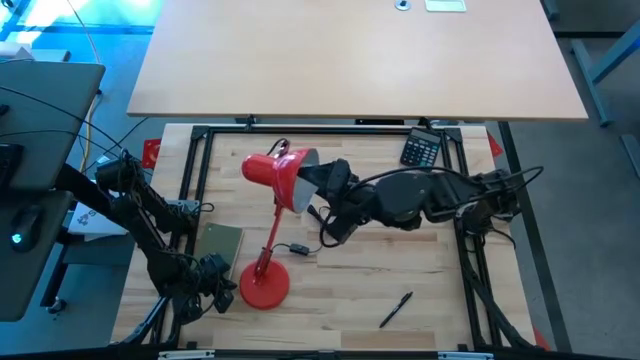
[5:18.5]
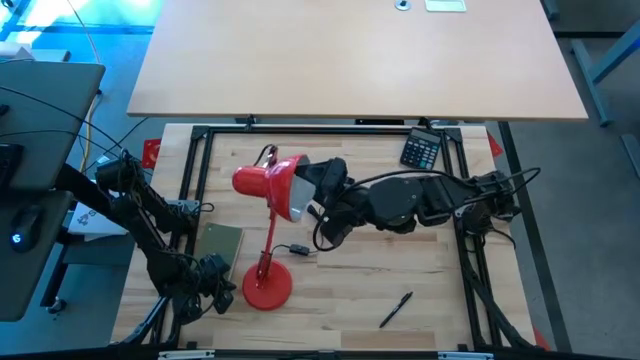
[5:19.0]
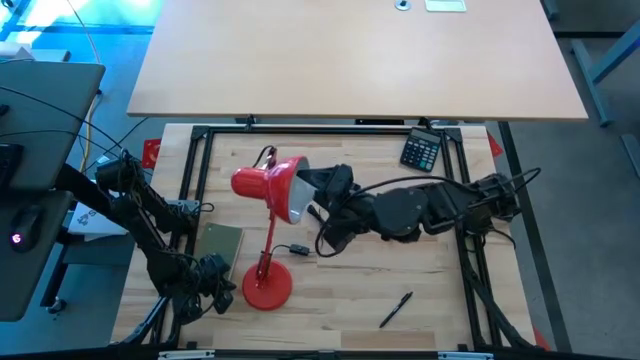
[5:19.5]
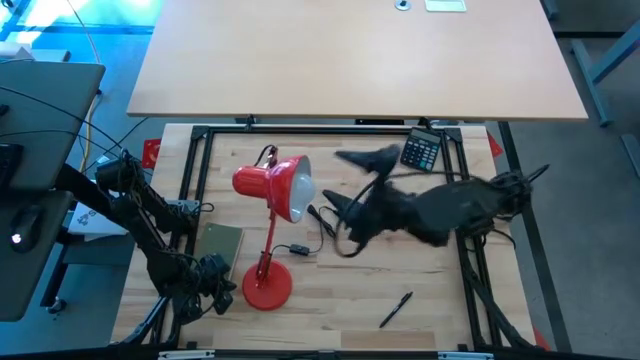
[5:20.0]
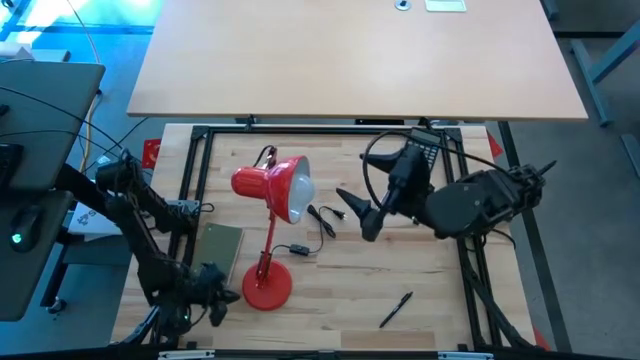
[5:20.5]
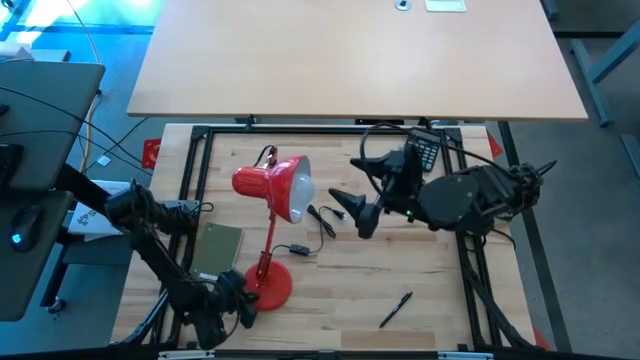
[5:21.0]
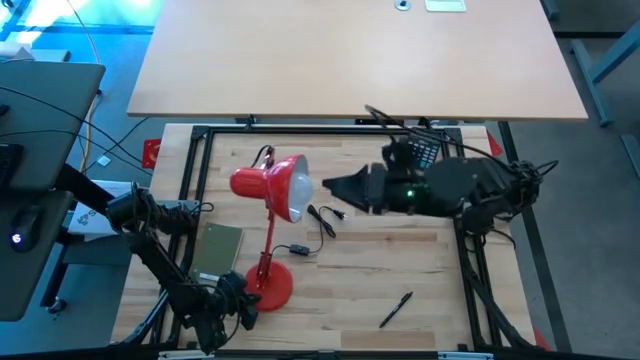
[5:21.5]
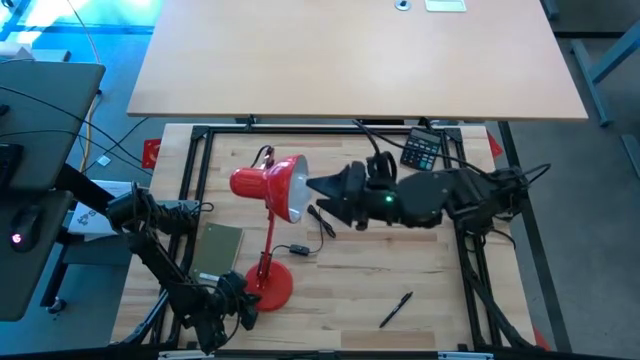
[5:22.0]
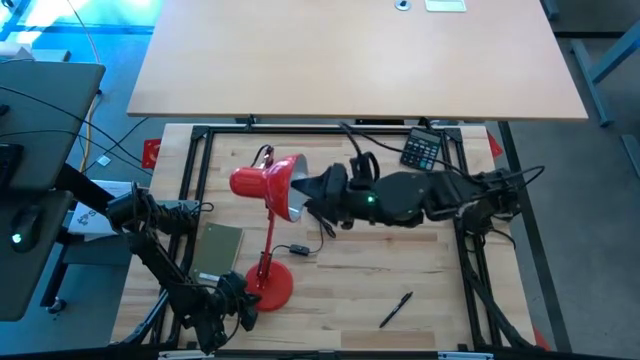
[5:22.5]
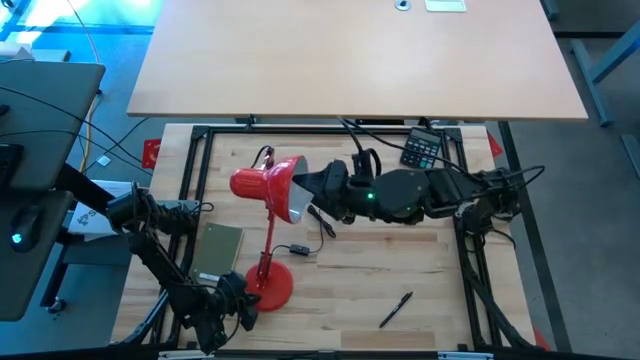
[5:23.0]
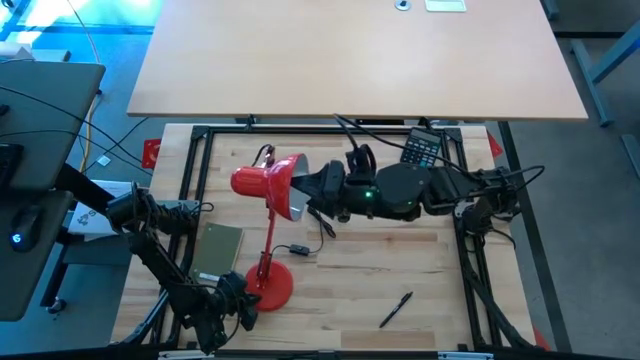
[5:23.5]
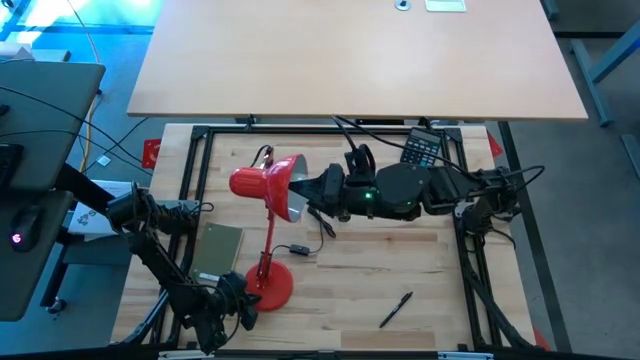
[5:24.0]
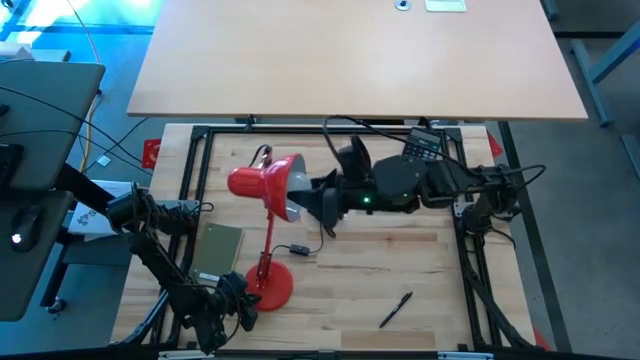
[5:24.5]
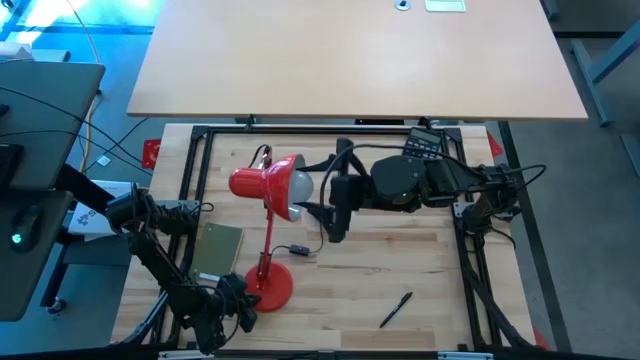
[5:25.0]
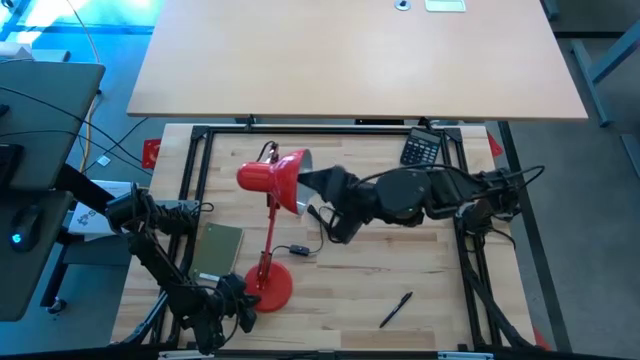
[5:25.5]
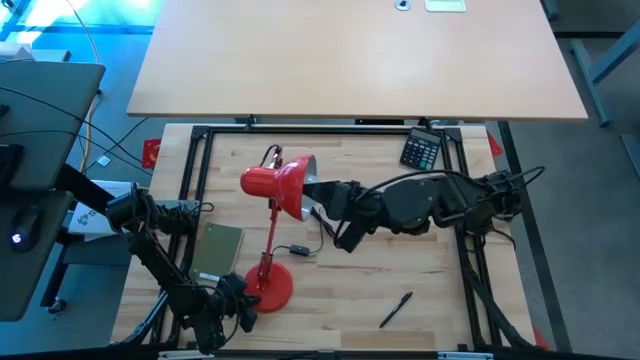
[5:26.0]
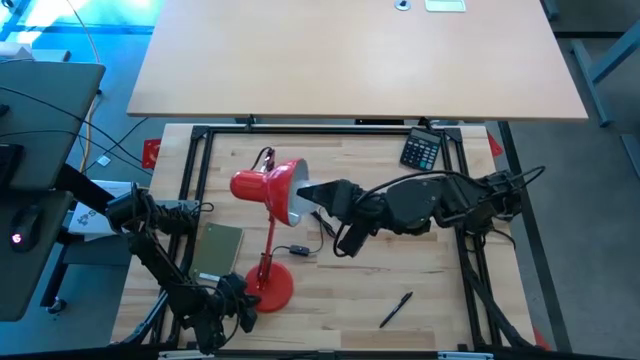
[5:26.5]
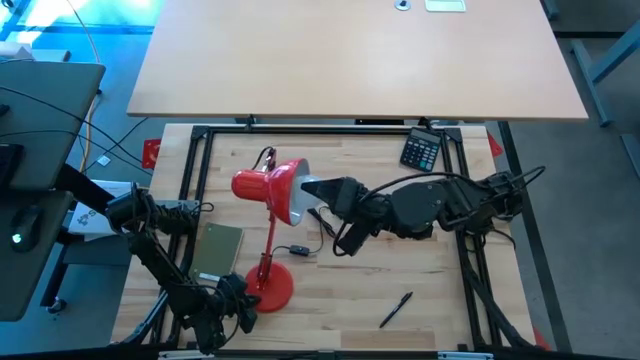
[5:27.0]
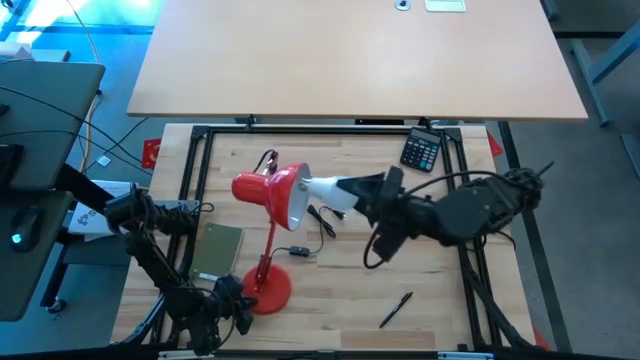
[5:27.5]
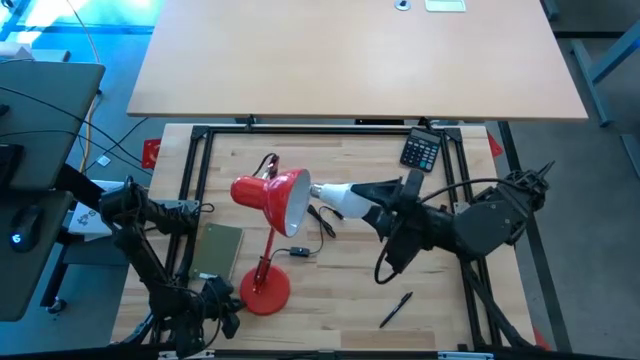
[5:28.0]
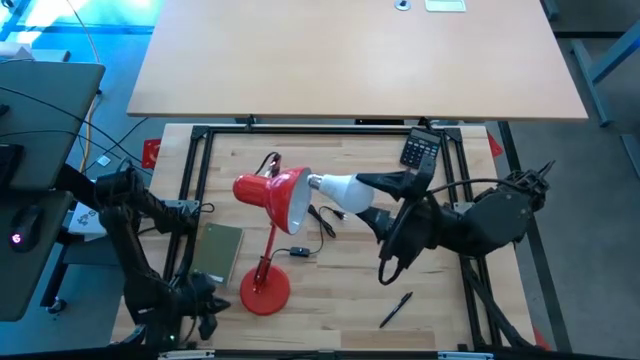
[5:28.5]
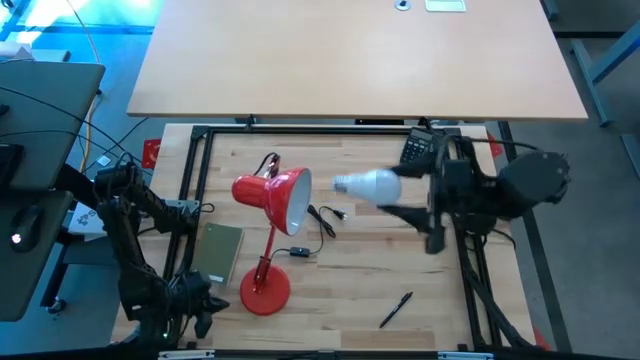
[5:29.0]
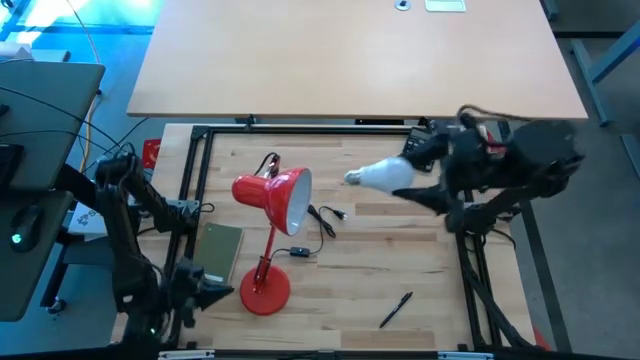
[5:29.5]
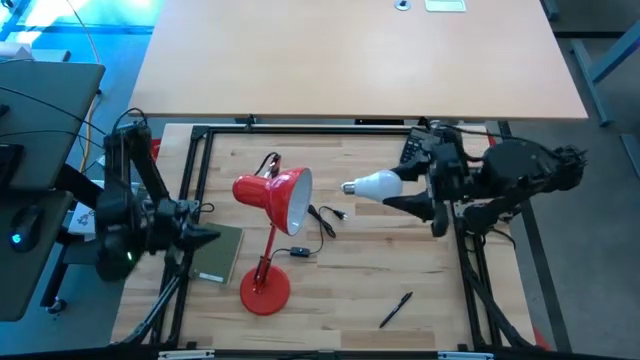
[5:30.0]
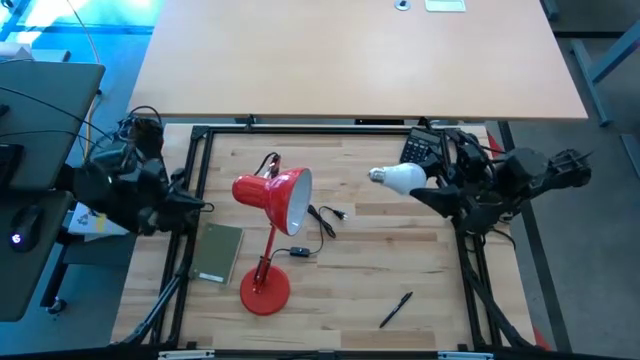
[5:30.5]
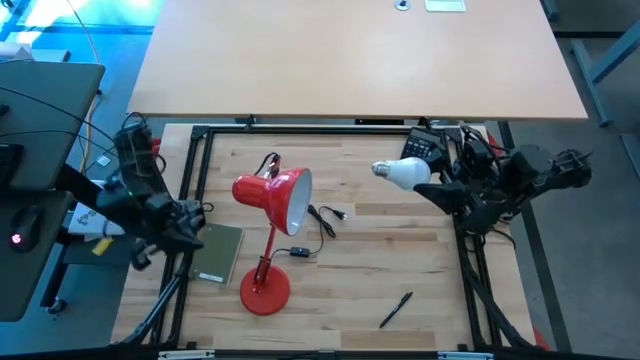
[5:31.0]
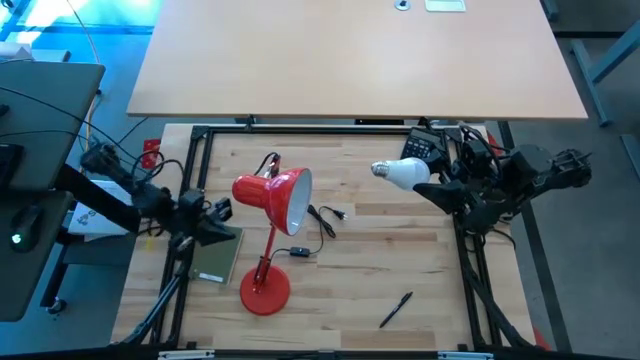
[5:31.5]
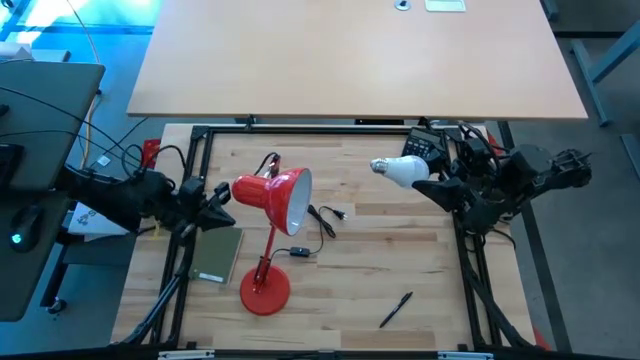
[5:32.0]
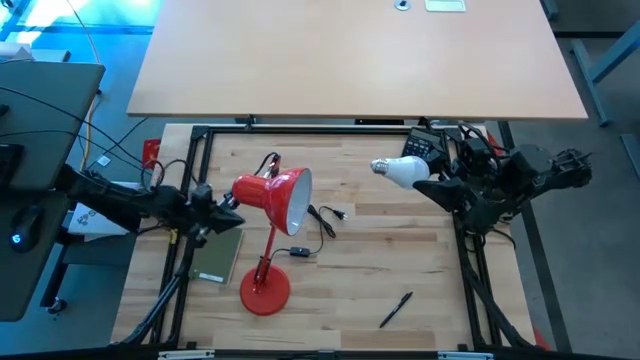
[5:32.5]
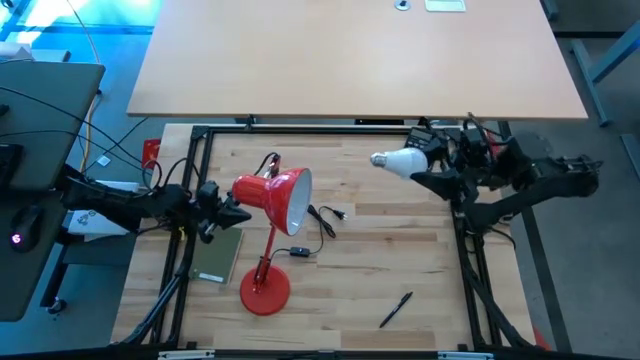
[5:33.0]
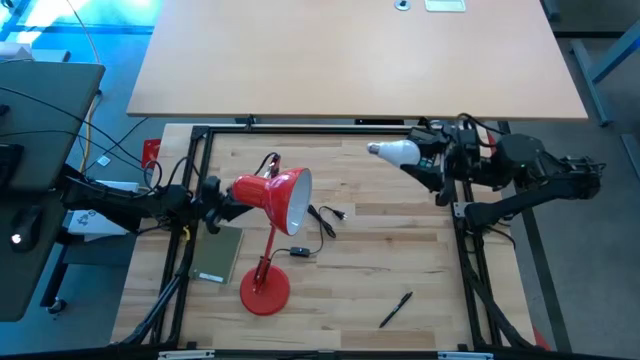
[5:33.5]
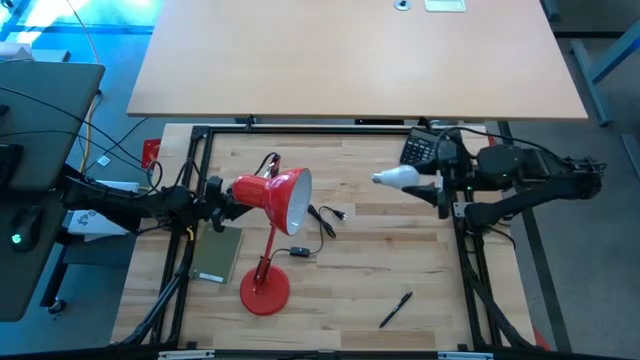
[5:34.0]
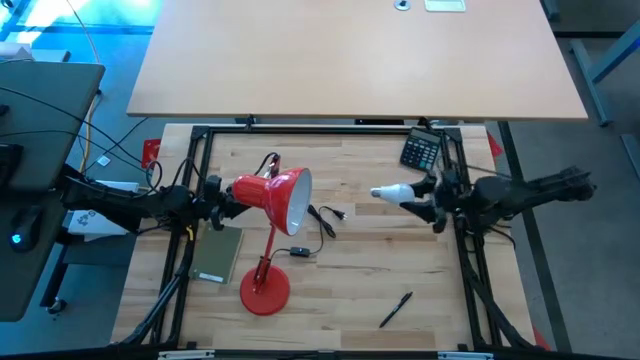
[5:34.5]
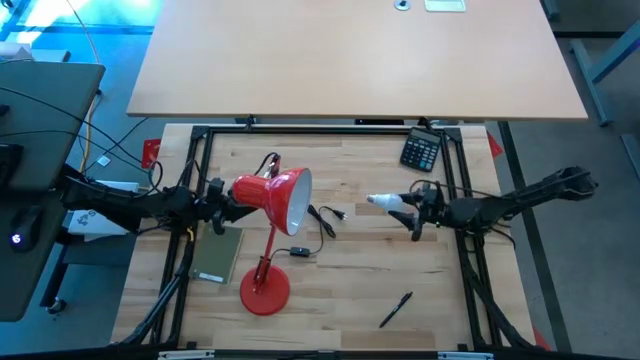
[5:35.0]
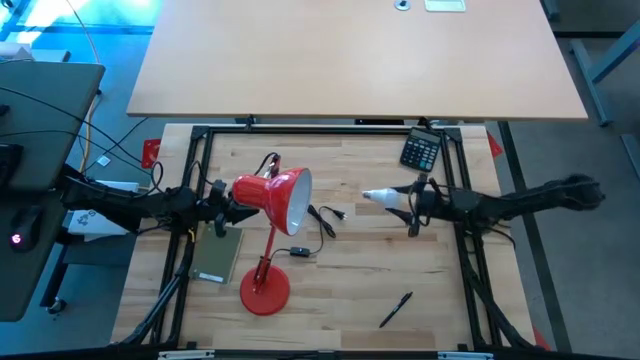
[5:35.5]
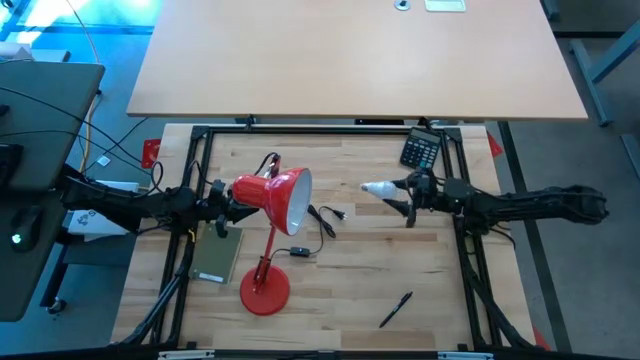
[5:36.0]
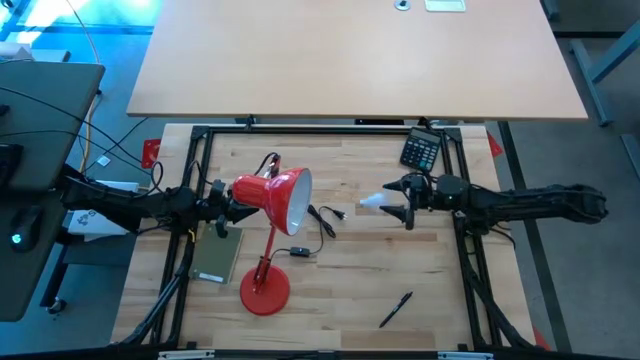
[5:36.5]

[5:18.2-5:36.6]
Task: Screw lightbulb
Remove the white lightbulb from the red lamp

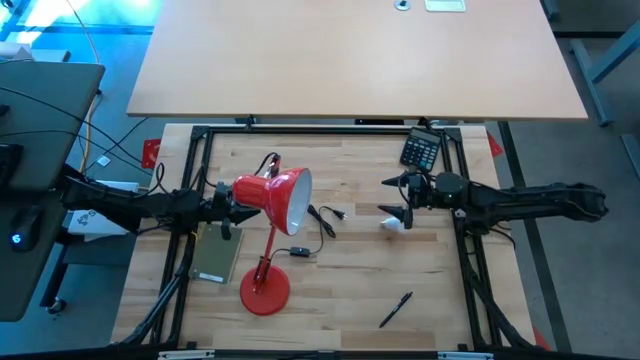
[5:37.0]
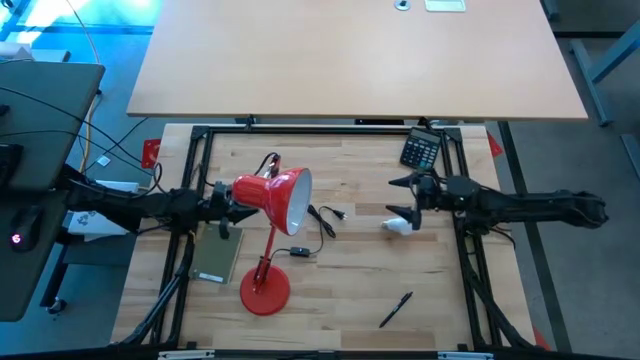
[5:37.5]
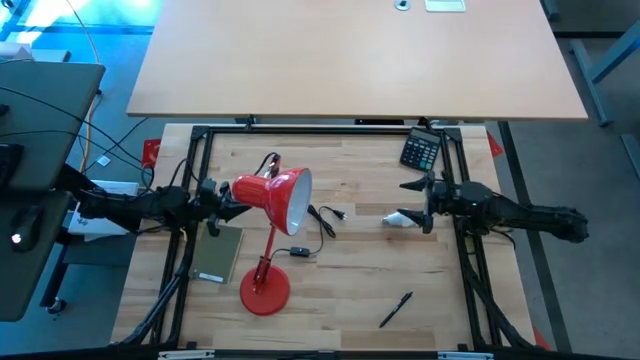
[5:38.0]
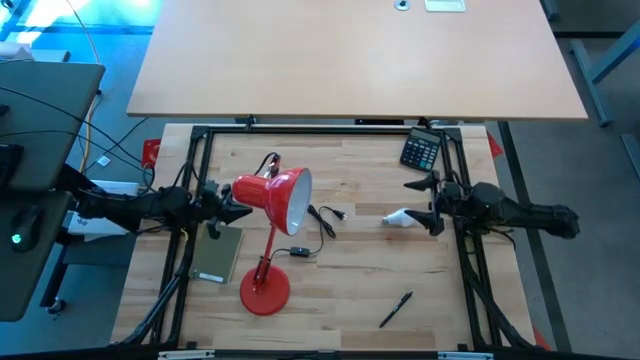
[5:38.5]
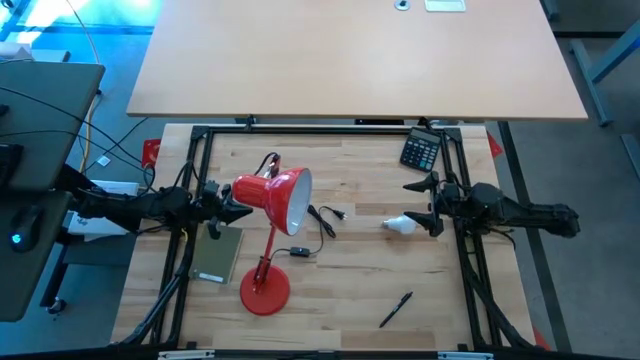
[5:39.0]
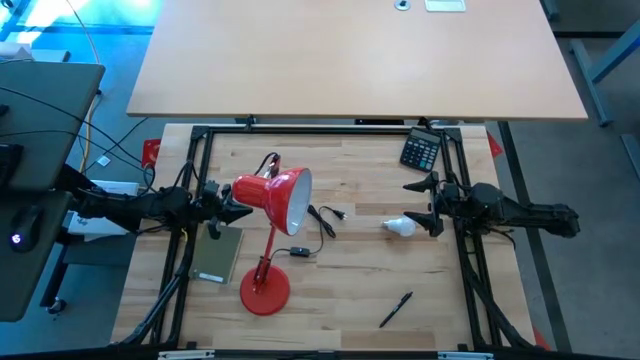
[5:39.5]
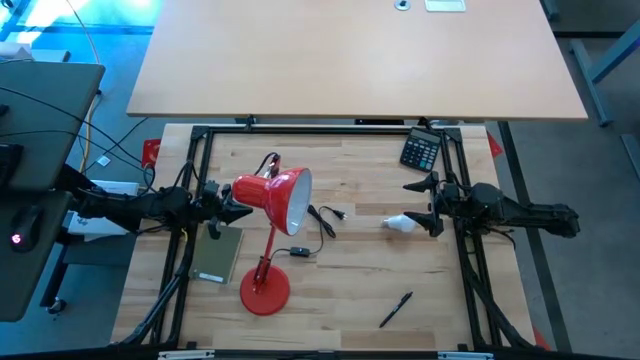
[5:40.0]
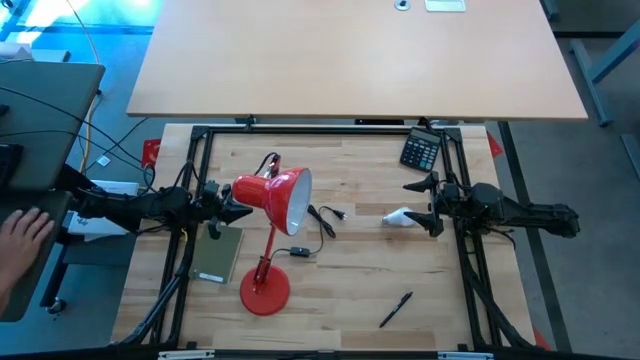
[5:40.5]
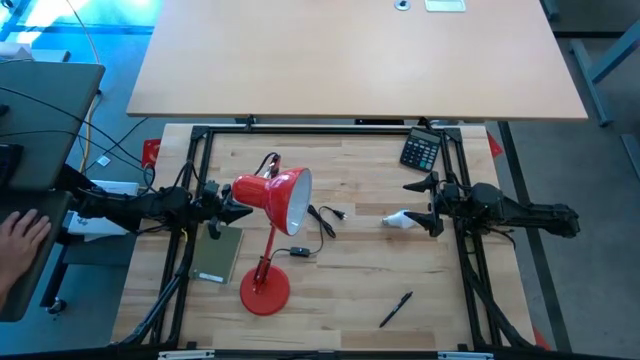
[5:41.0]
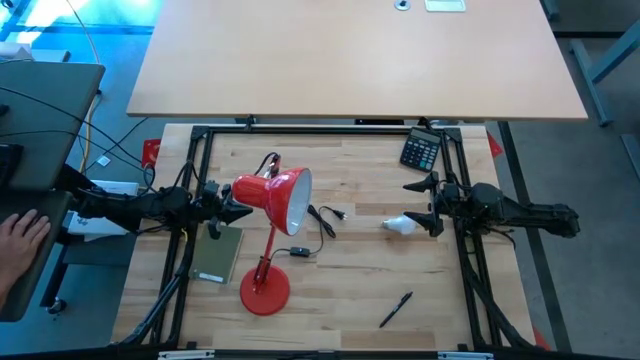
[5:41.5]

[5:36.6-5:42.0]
Return to Home Position
